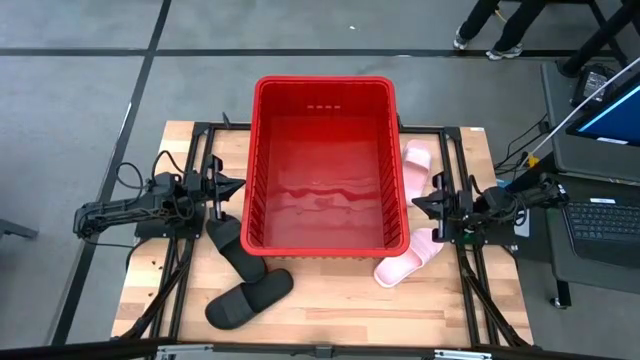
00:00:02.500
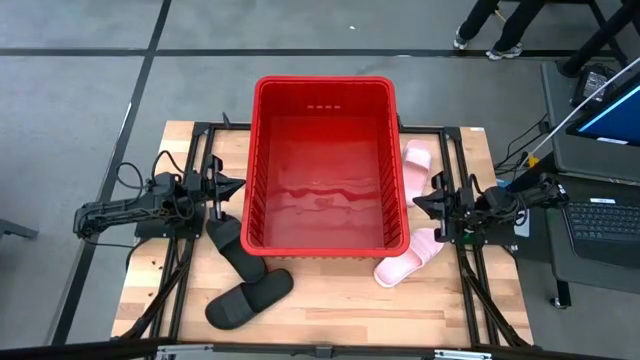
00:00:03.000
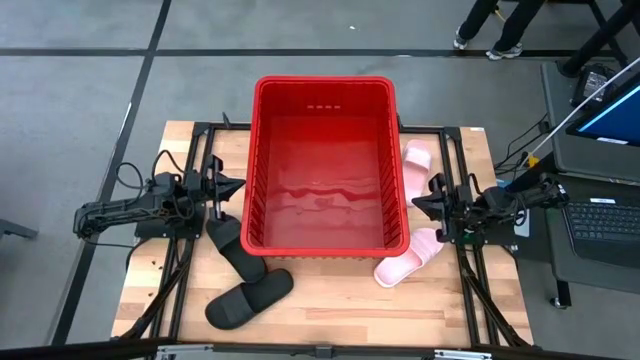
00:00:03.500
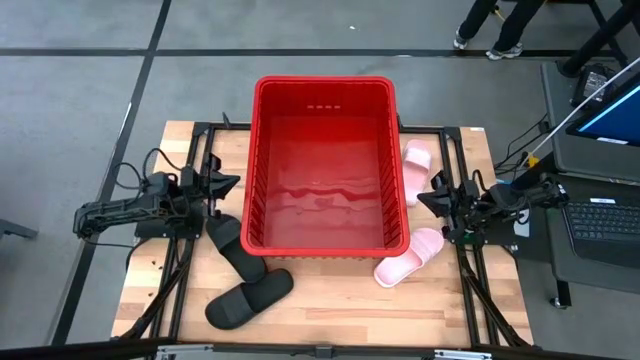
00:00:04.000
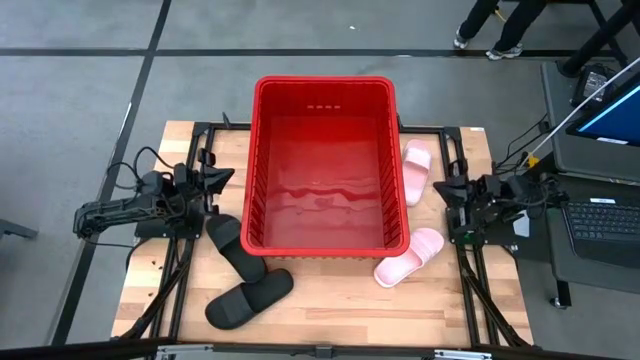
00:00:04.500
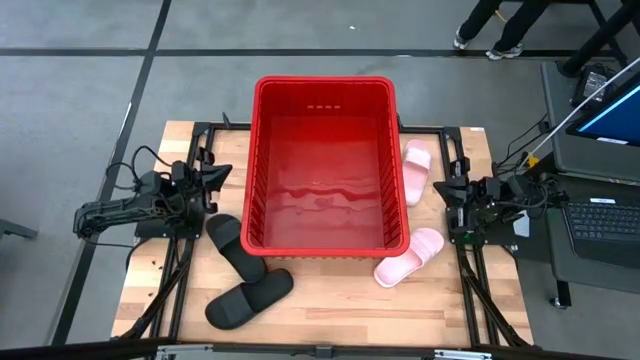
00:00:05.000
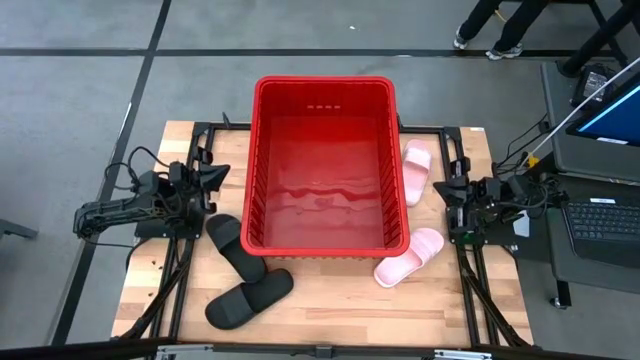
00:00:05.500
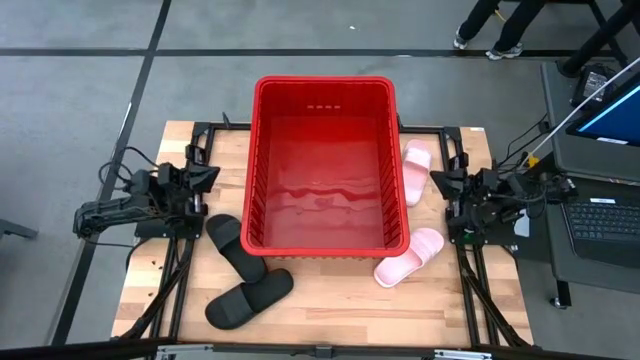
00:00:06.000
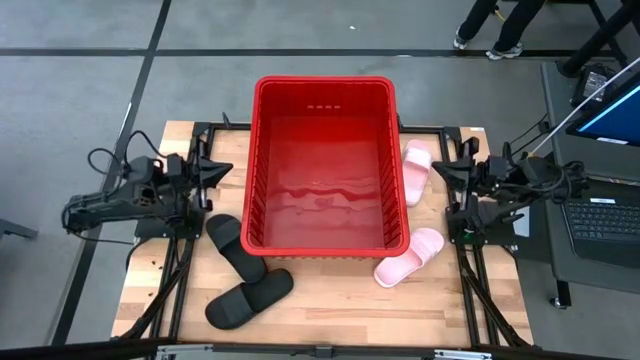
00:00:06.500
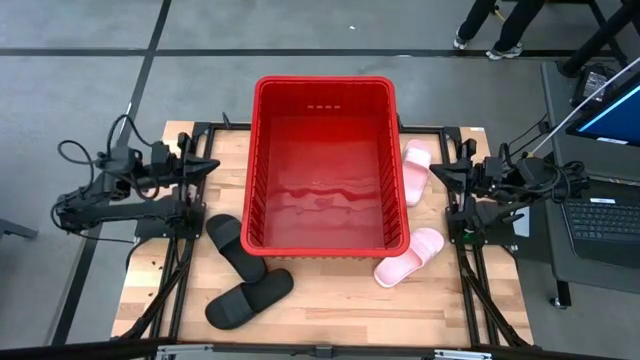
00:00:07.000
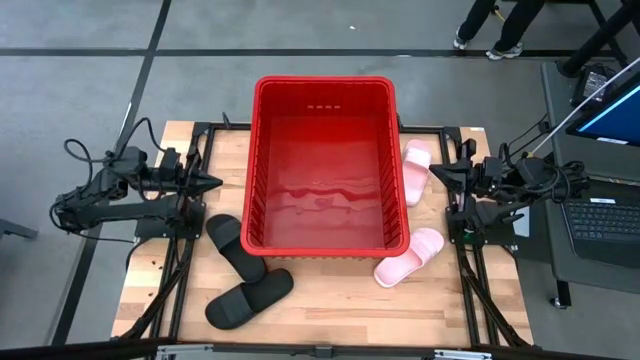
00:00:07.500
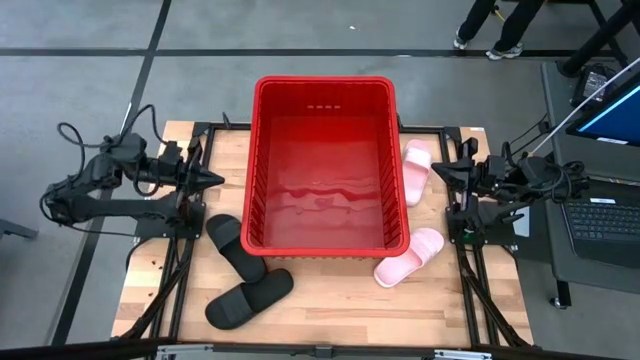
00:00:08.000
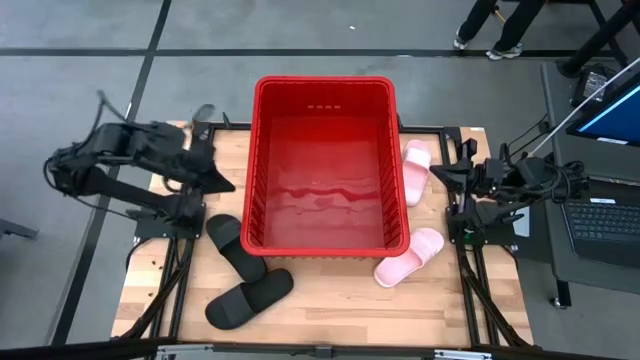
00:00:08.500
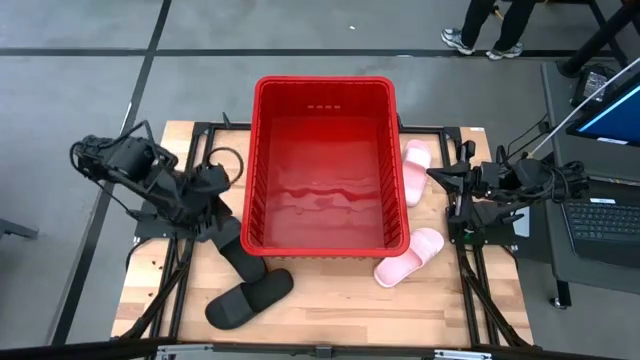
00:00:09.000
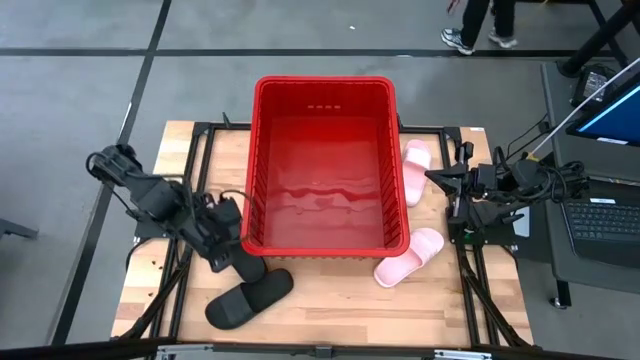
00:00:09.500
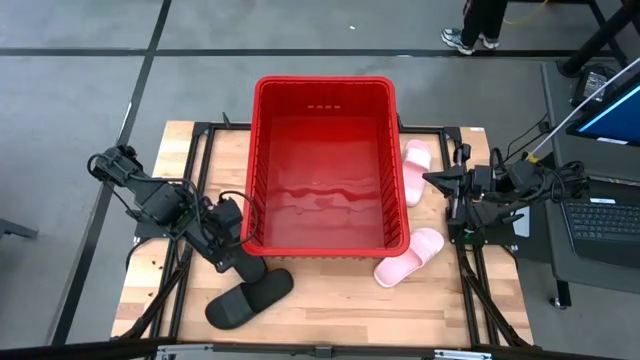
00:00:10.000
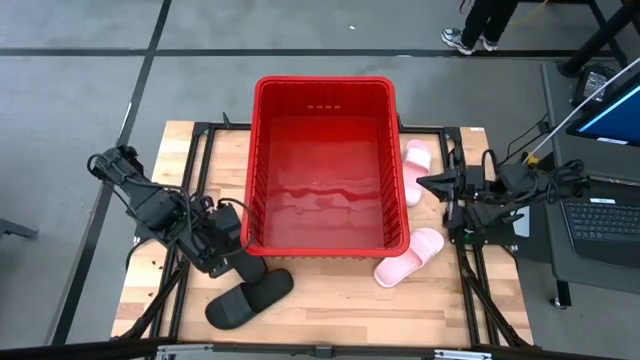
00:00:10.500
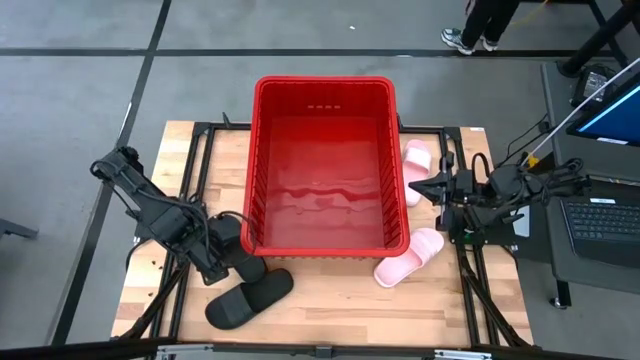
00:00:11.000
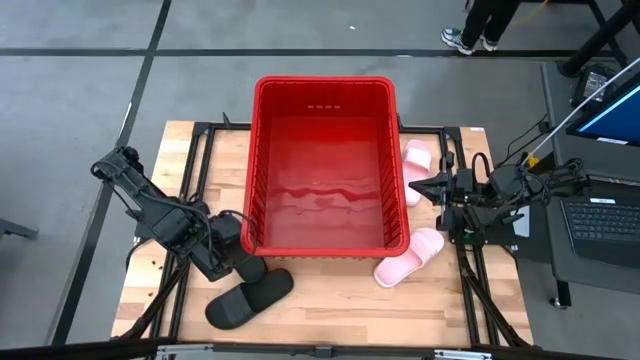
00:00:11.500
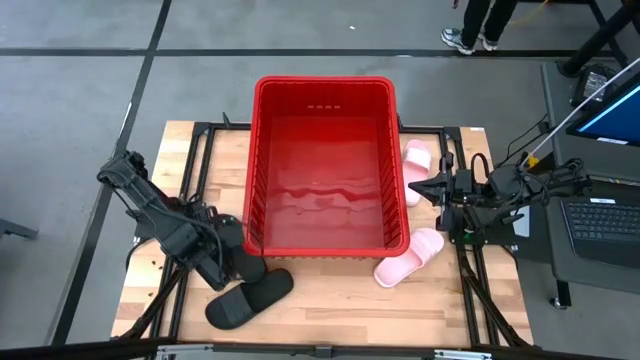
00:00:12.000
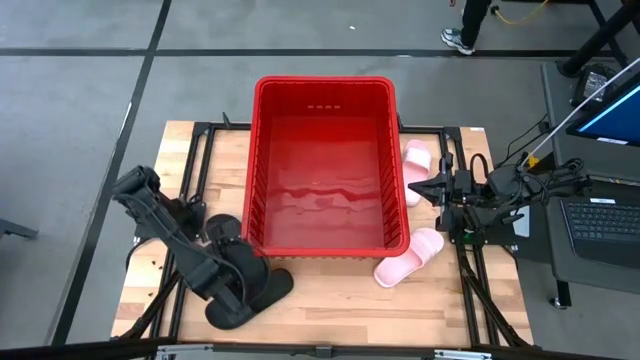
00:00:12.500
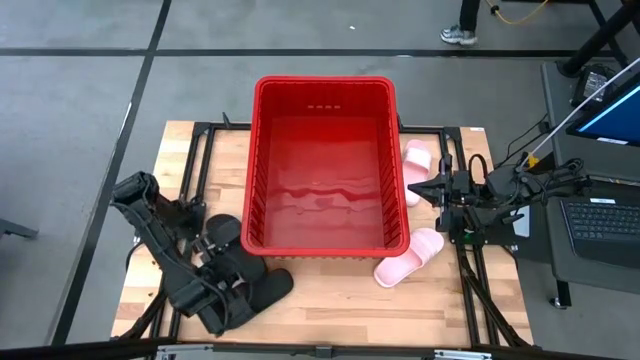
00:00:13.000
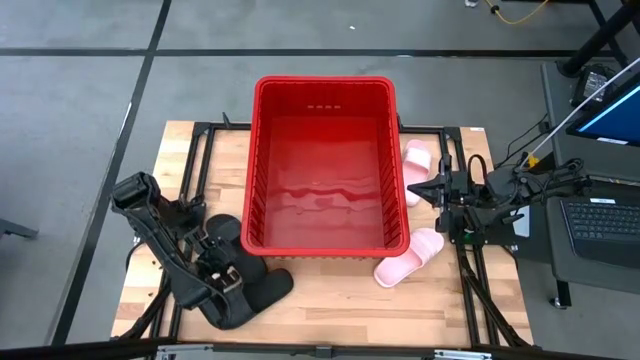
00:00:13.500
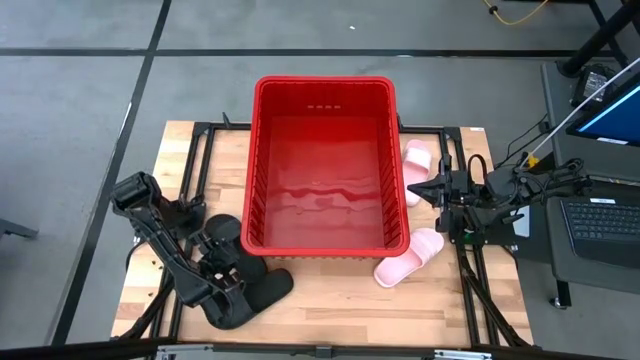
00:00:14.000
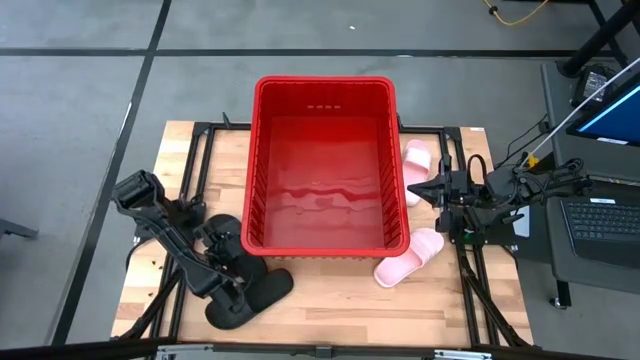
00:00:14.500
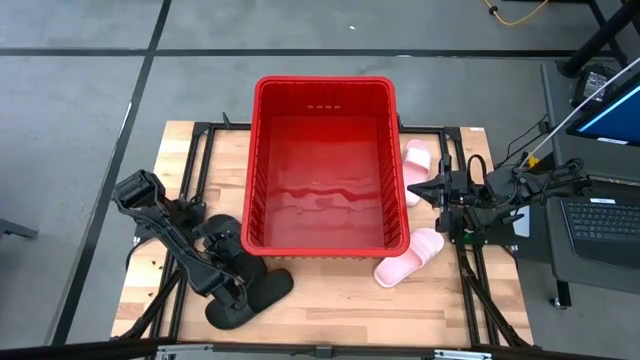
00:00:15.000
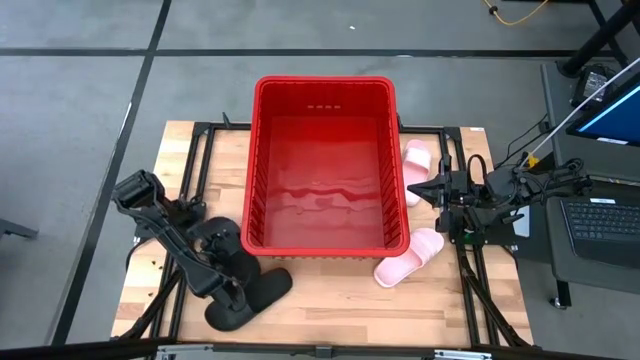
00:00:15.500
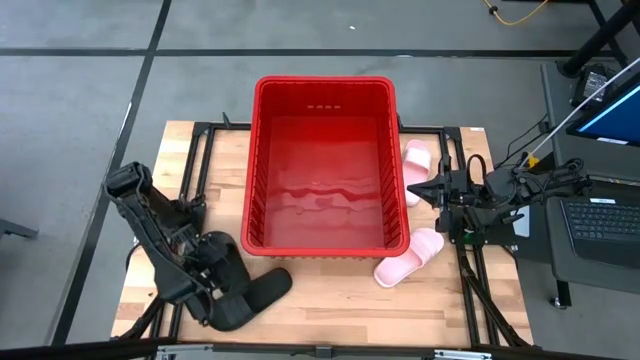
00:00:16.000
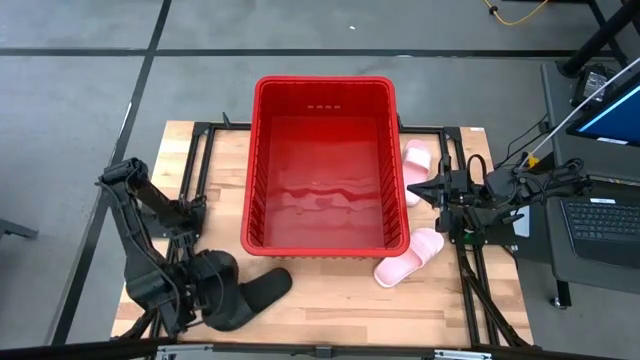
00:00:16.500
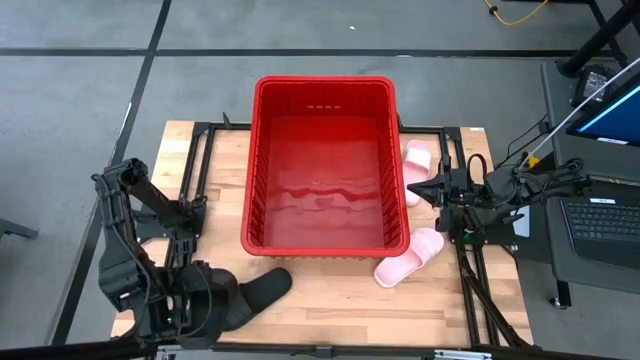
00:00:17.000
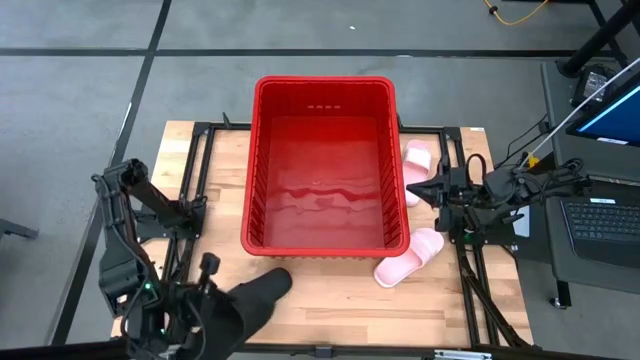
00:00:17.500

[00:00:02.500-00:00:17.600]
Task: Pick and place slides into bin
Put the top left black slide into the red bin

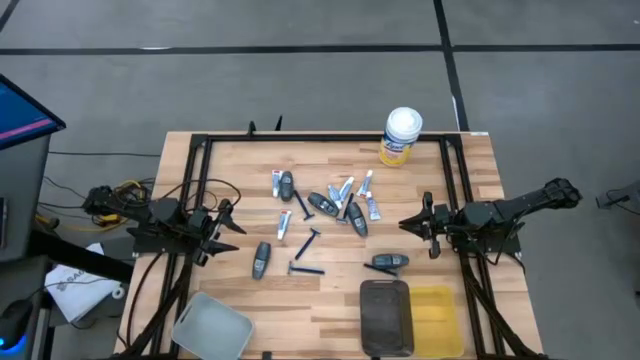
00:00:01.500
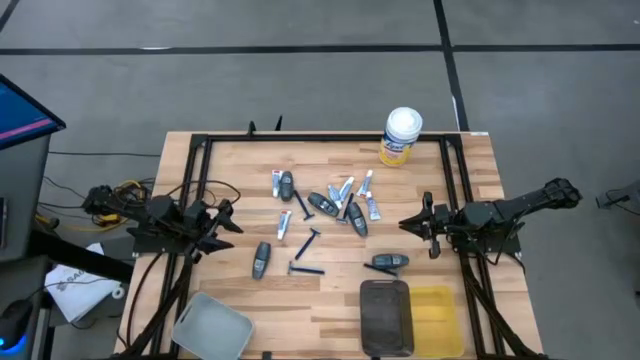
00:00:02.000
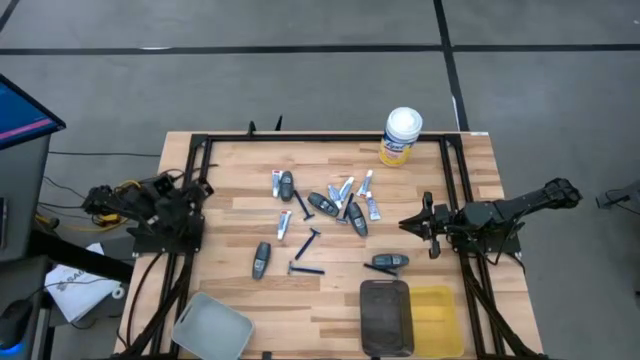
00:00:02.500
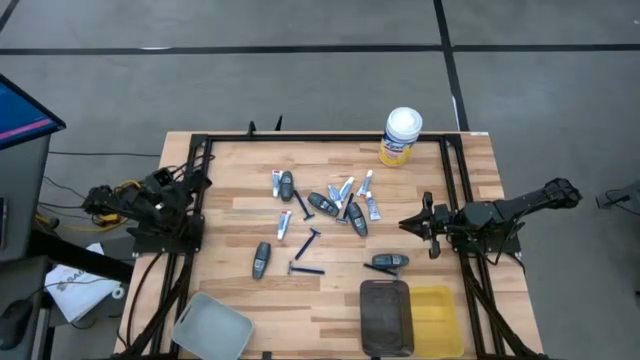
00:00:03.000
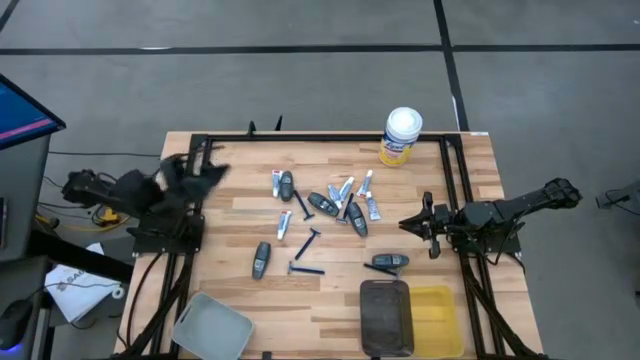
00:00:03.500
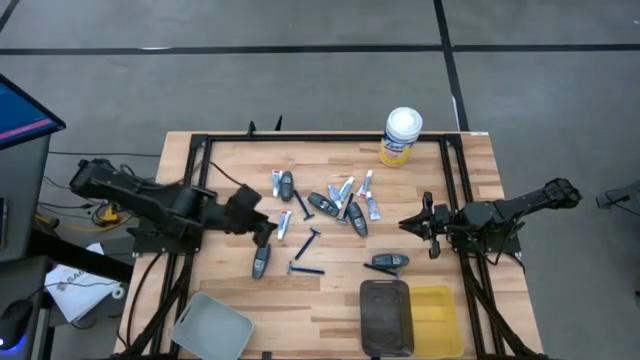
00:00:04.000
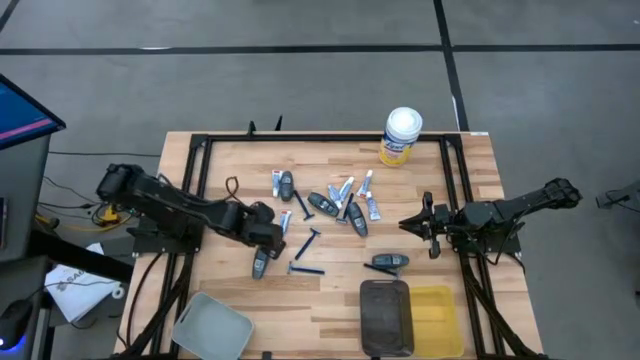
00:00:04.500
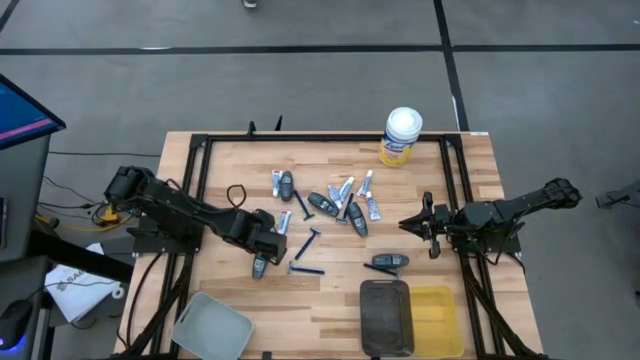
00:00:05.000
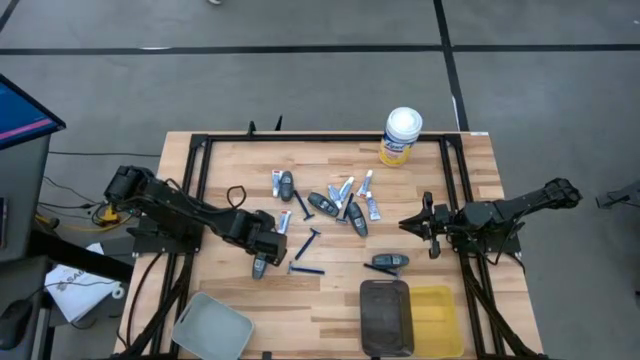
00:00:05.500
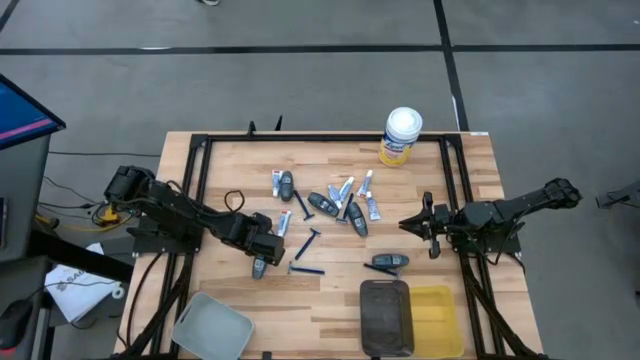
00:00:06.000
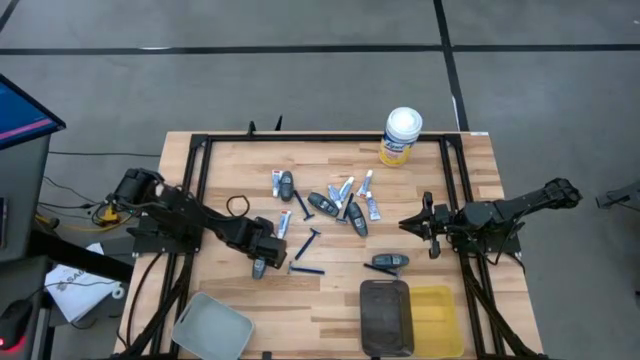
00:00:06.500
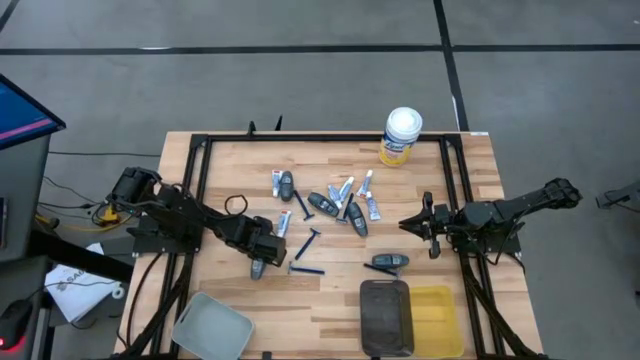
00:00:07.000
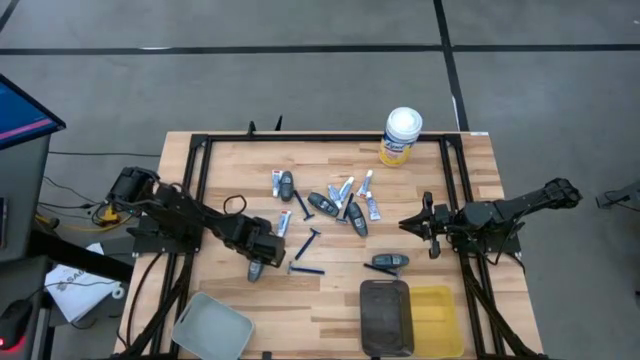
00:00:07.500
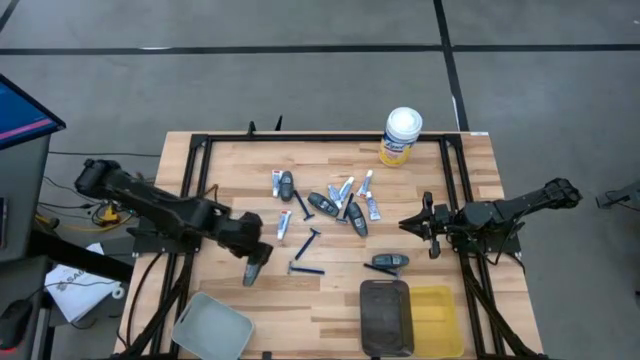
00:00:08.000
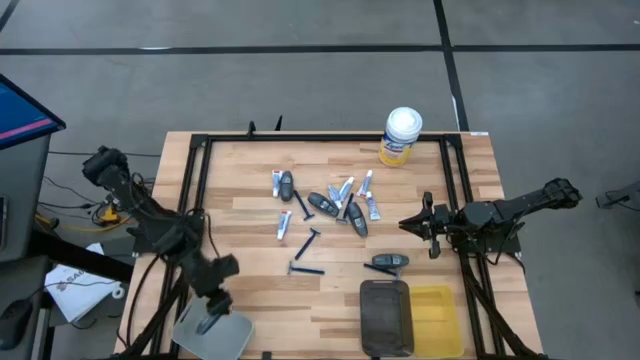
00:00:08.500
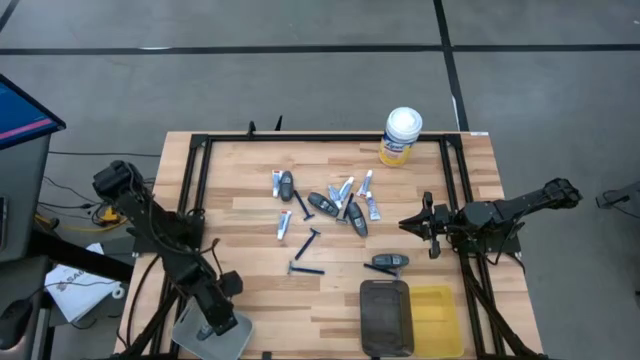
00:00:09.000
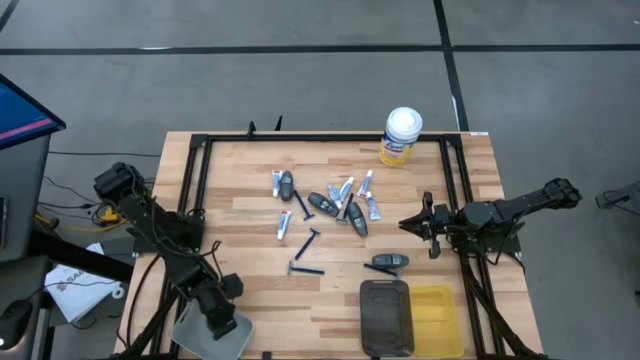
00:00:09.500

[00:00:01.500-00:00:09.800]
Task: Pick & Place Travel size toiletries
Put the deodorant into the gray bin
